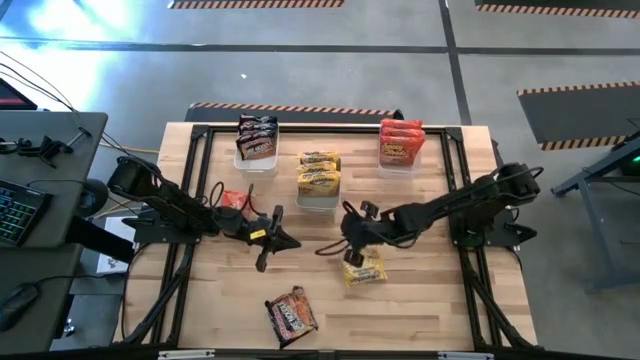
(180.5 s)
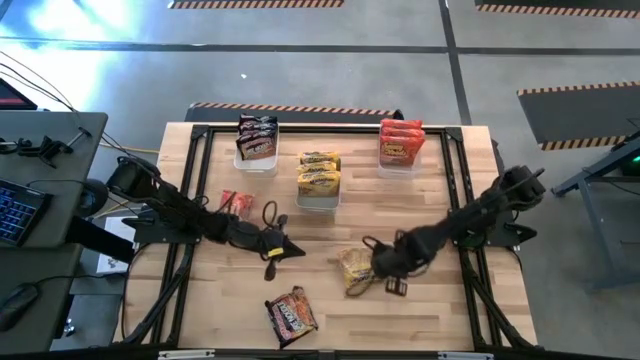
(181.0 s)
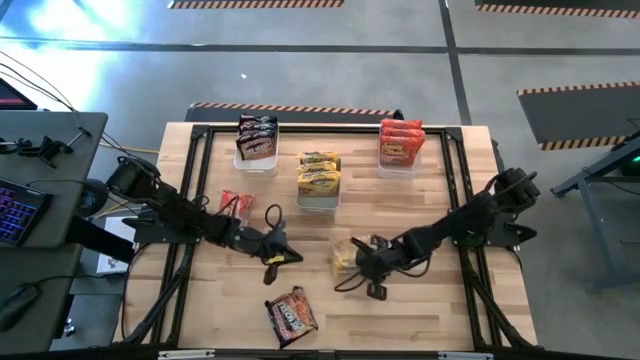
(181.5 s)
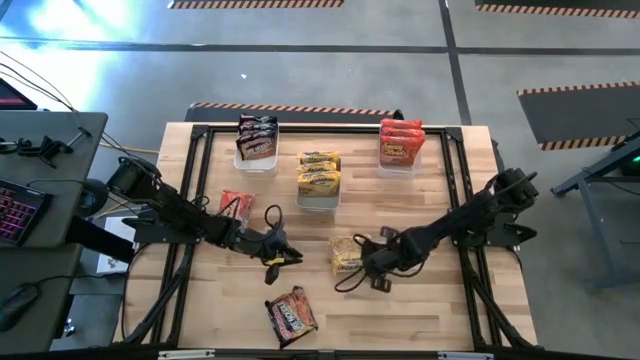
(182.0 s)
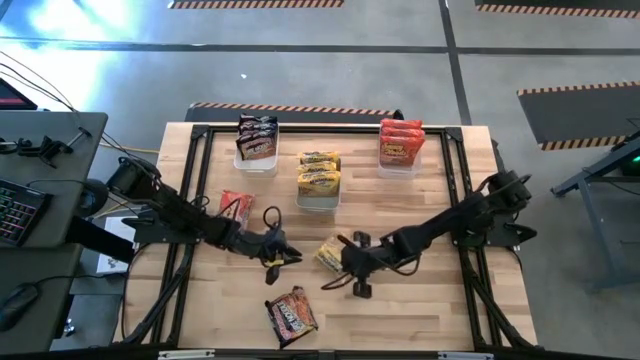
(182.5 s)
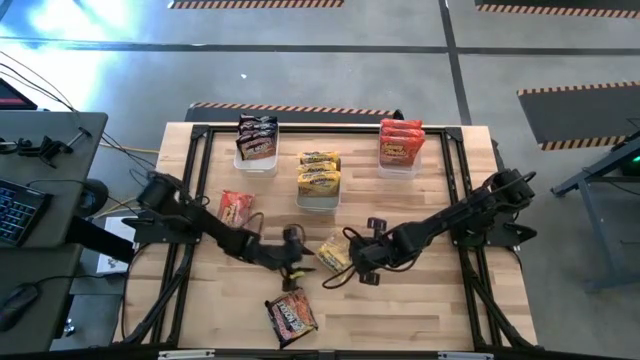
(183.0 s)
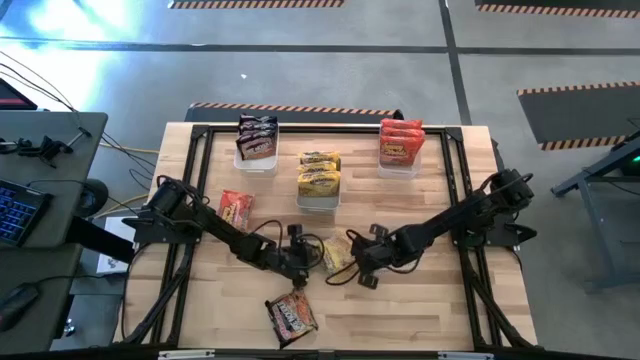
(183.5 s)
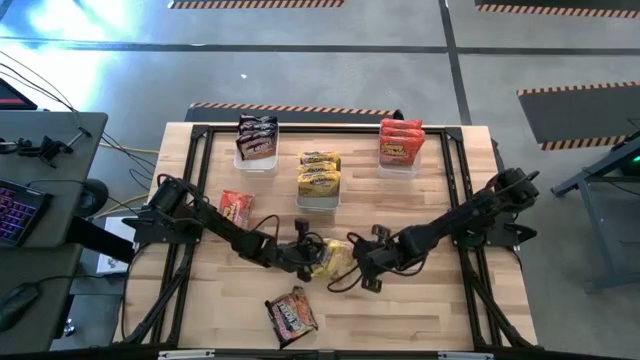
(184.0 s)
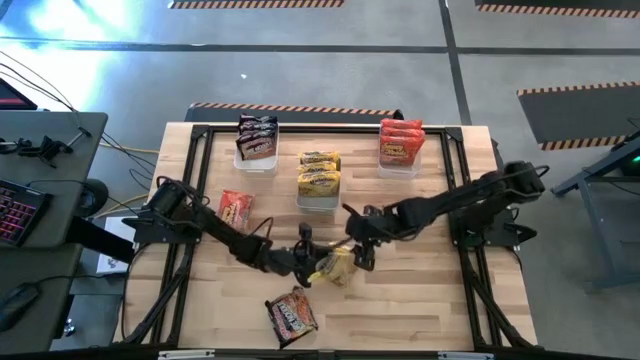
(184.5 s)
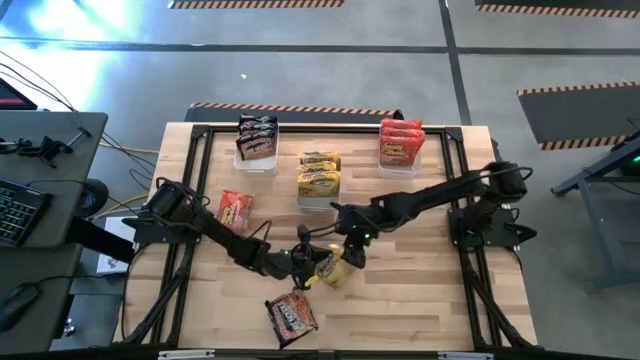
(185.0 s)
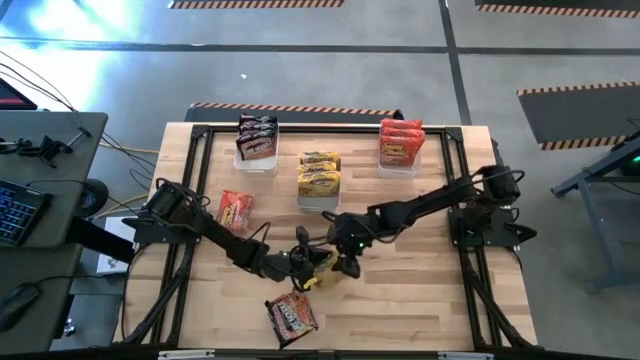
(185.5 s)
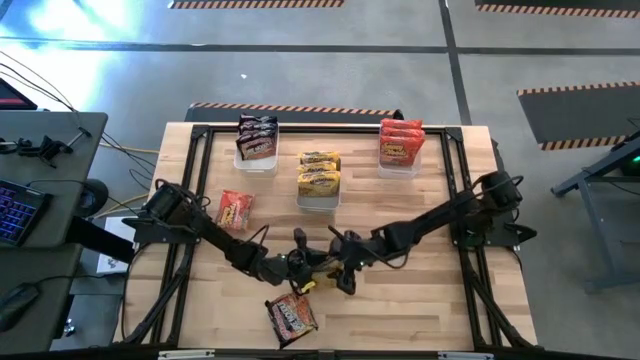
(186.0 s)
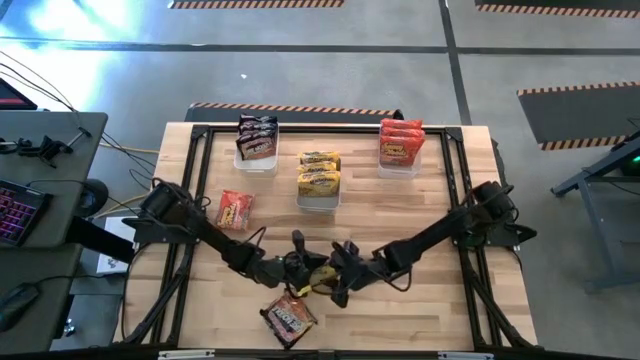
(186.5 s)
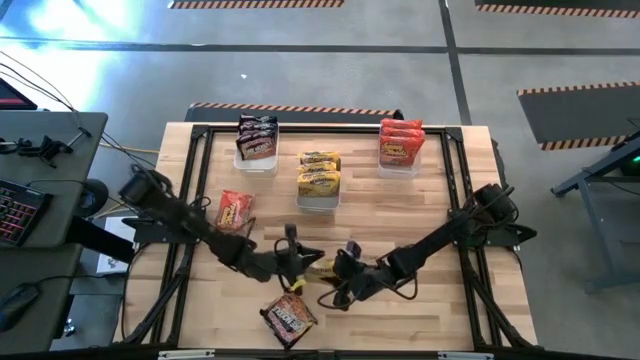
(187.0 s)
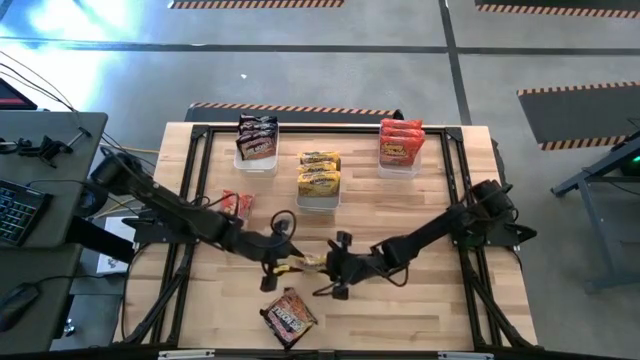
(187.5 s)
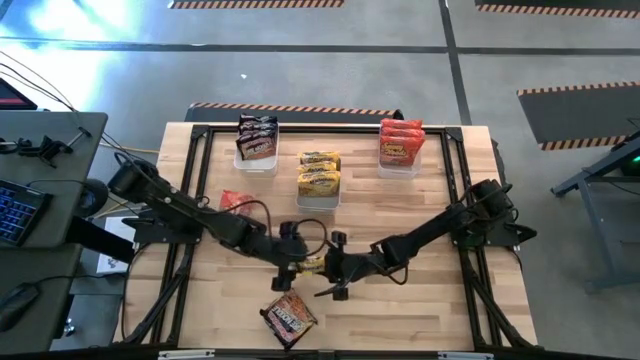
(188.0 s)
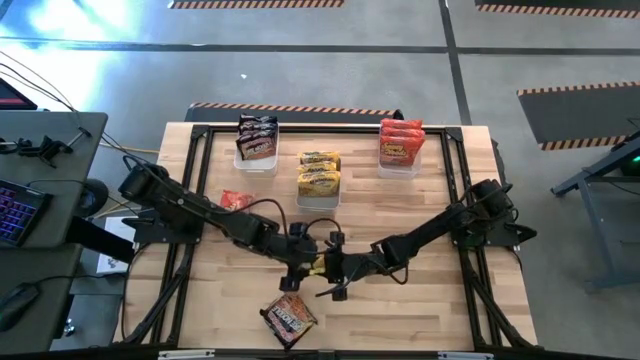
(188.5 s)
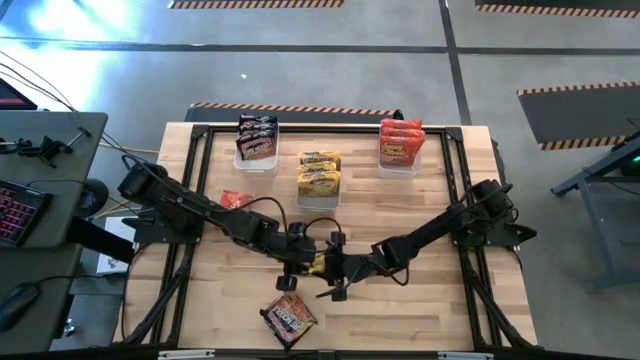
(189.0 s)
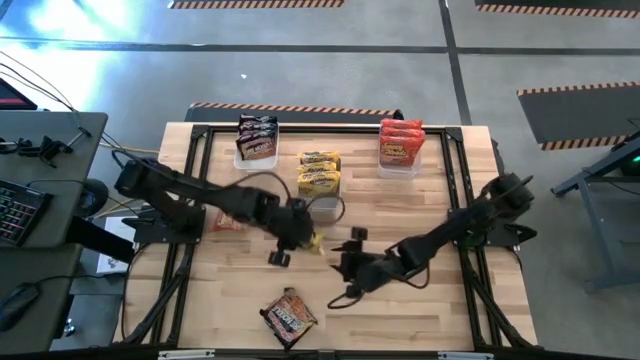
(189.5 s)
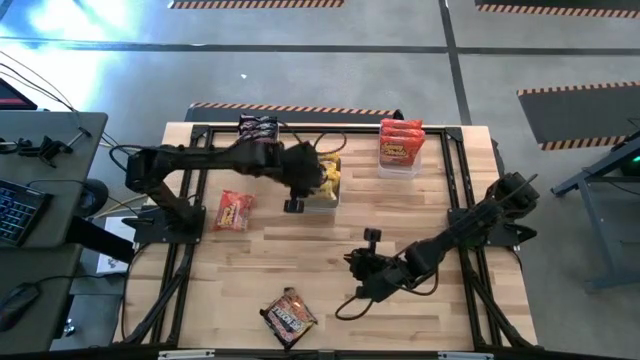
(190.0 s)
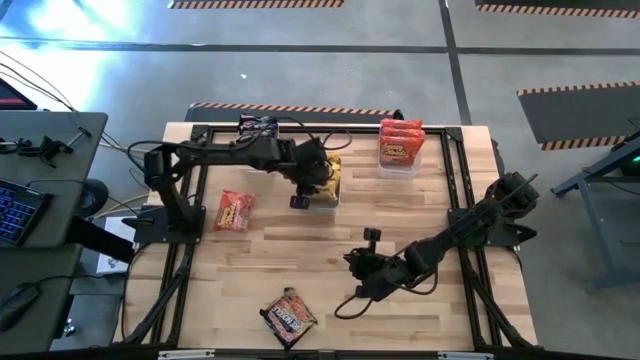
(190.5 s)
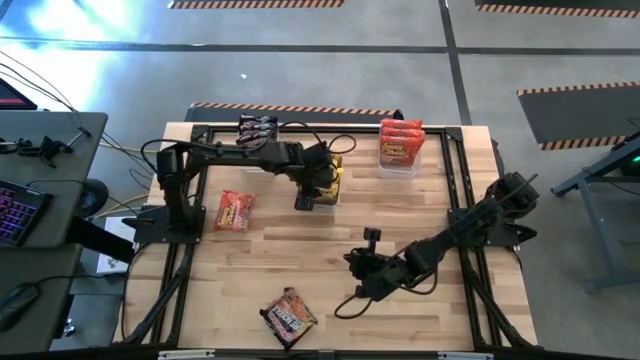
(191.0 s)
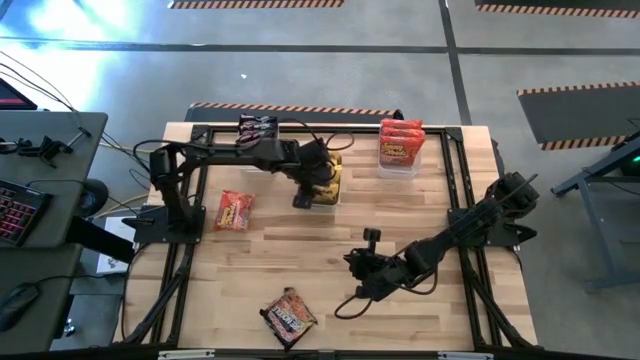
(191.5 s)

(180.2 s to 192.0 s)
Task: Sort Maruchan noodles
Put the yellow noodle pack into the gray bin

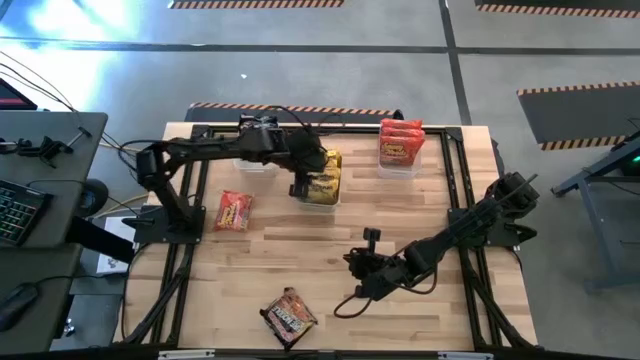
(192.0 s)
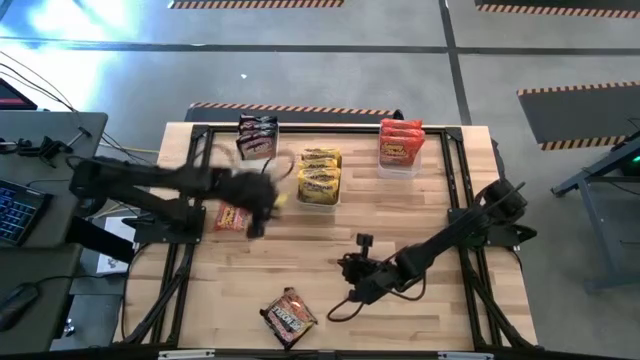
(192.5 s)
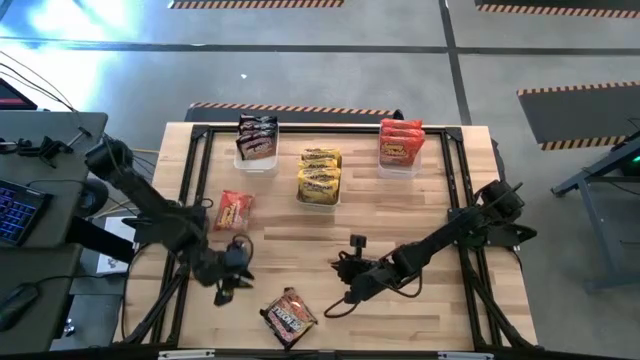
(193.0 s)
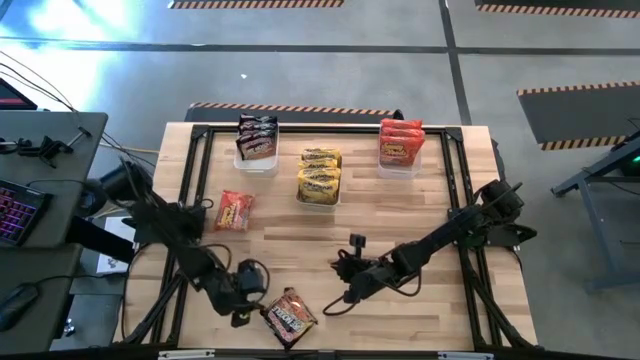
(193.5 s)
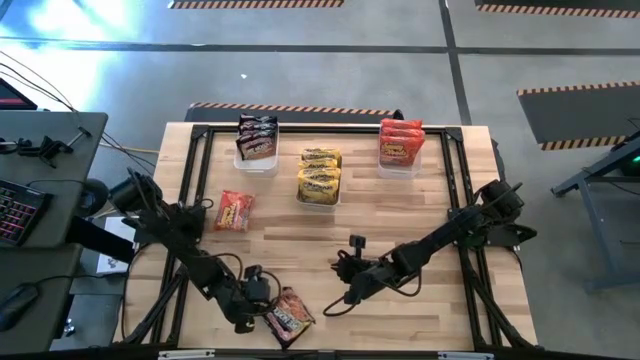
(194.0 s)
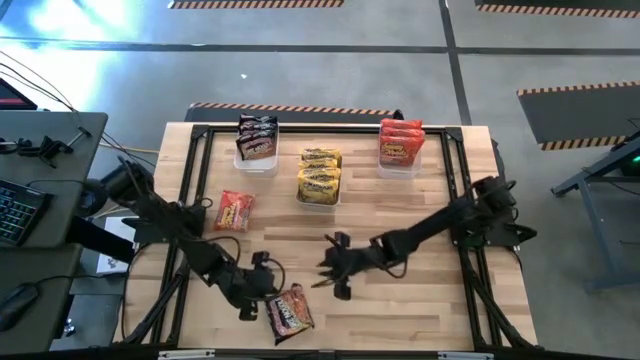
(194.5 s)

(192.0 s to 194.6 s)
Put the black noodle pack into the white bin

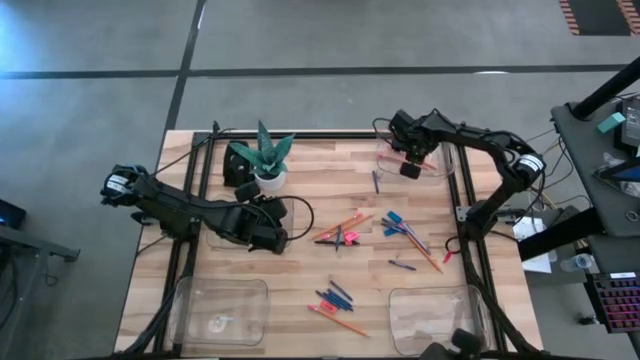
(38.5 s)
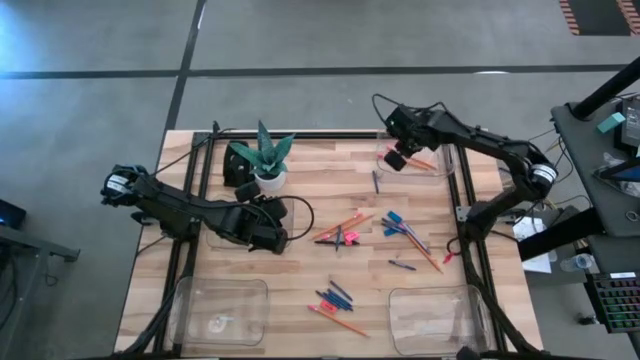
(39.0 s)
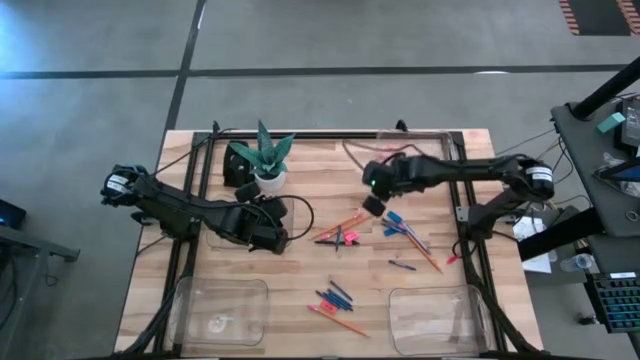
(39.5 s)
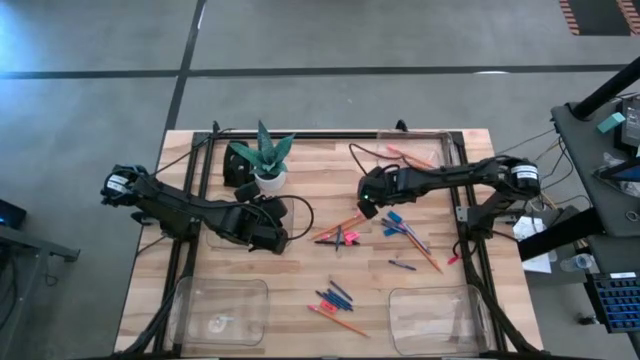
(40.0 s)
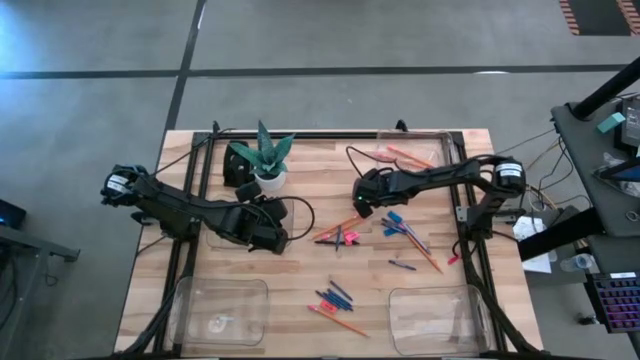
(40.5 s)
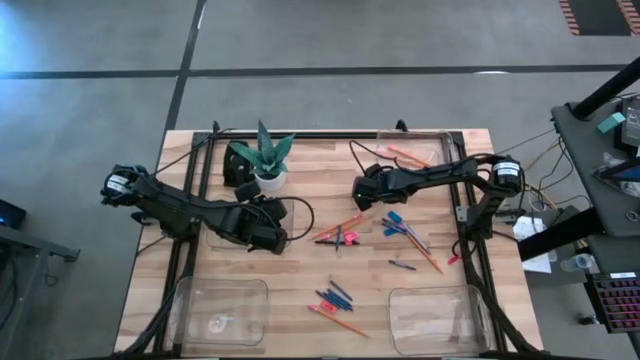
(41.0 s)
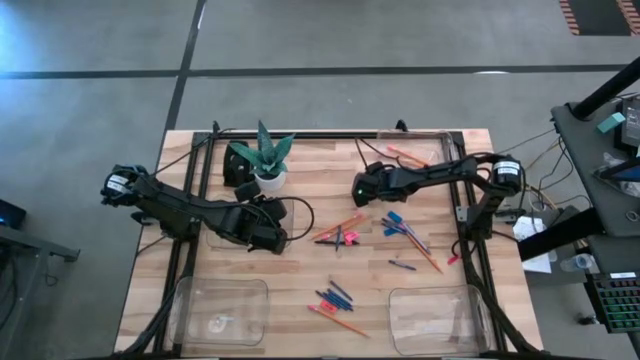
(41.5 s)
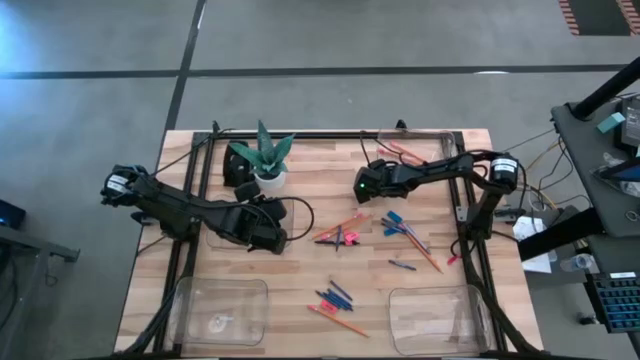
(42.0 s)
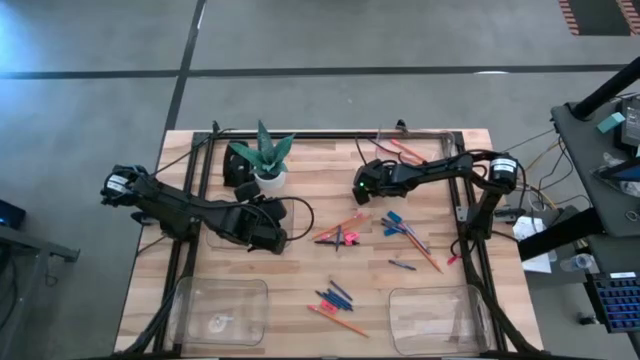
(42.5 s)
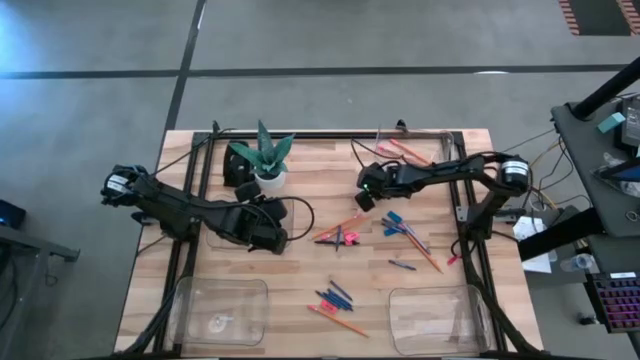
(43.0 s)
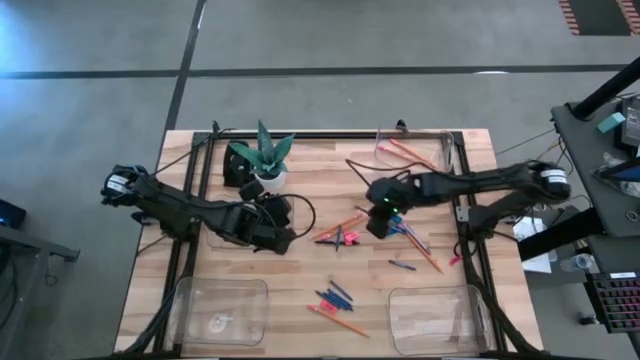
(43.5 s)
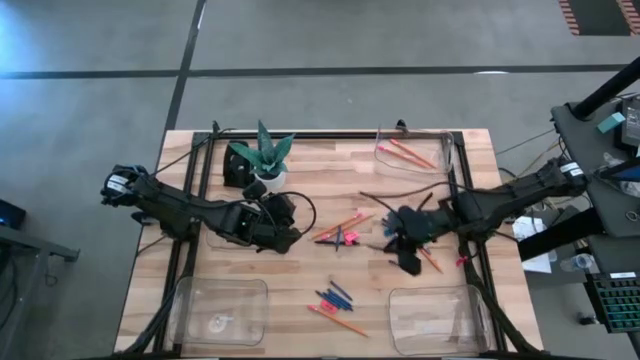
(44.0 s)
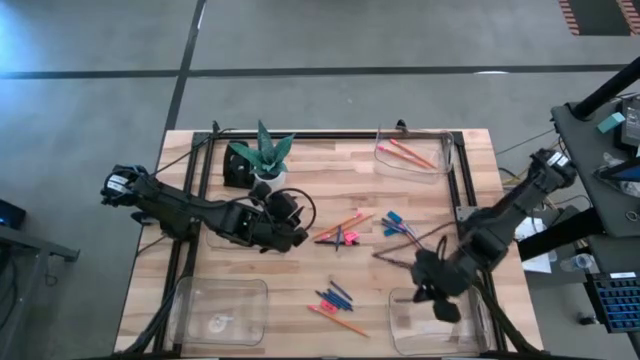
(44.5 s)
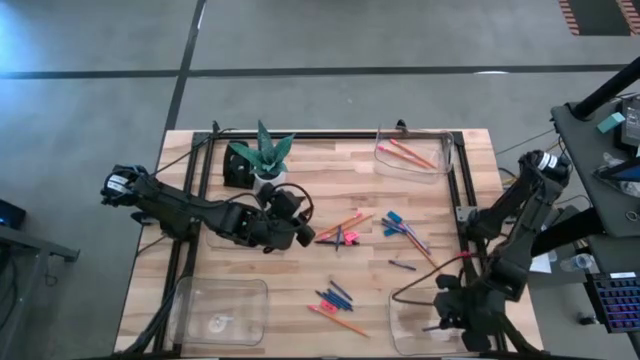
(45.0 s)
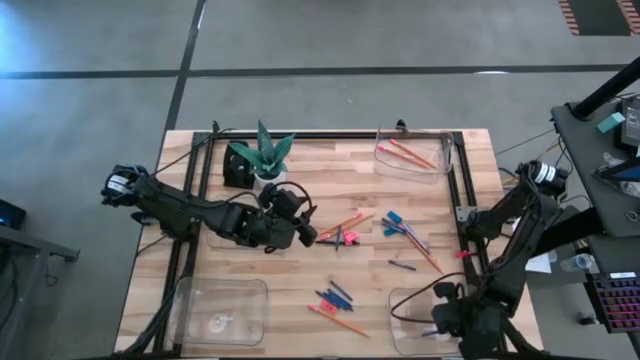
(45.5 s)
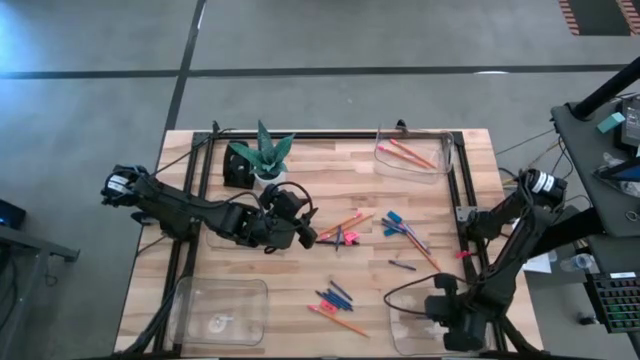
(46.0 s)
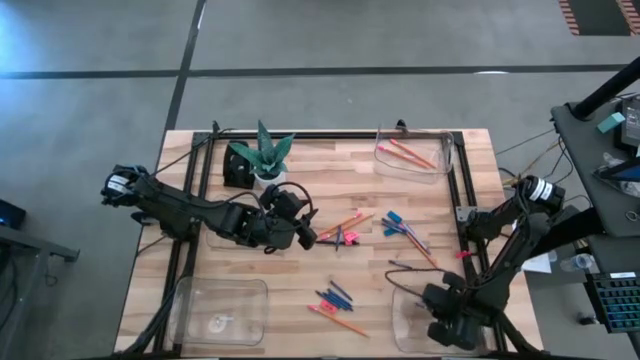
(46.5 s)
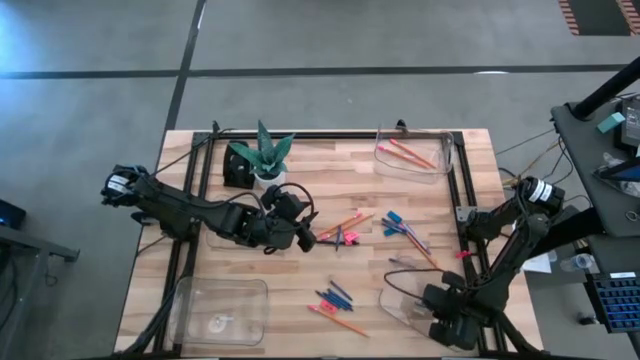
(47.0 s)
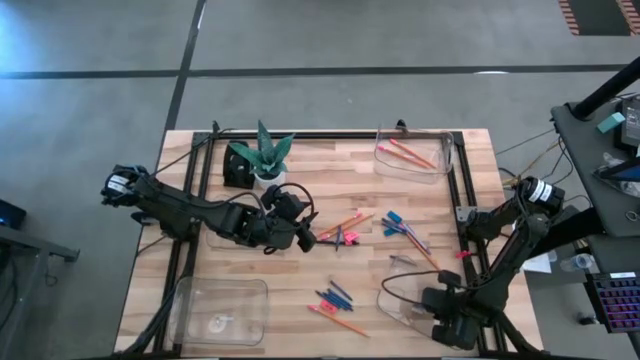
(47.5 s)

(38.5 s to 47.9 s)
Task: Sort crayons/erasers/pens/pencils in bins
Put the blue crayon into the bottom right transparent bin
